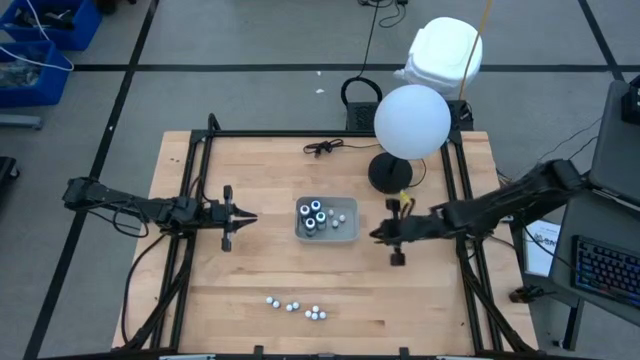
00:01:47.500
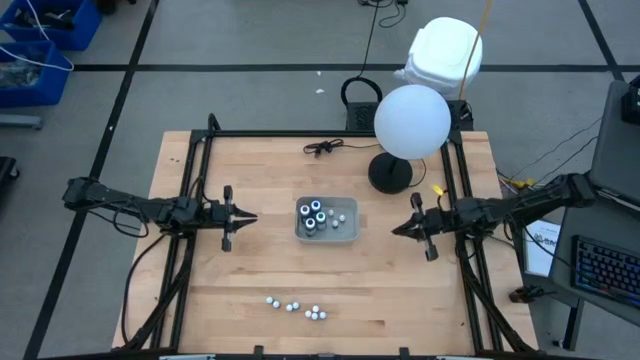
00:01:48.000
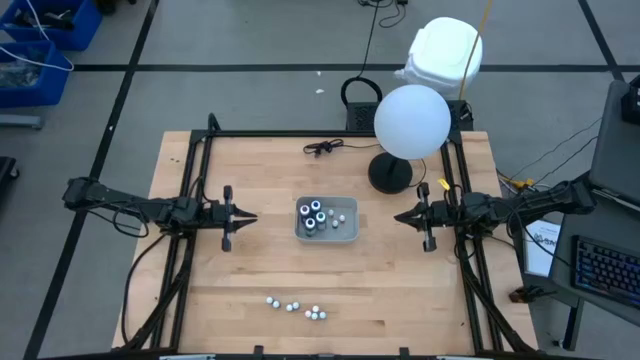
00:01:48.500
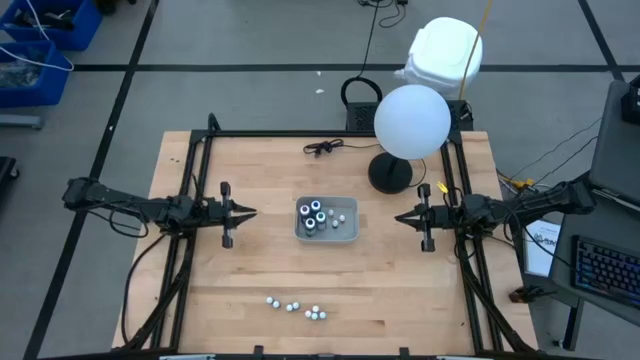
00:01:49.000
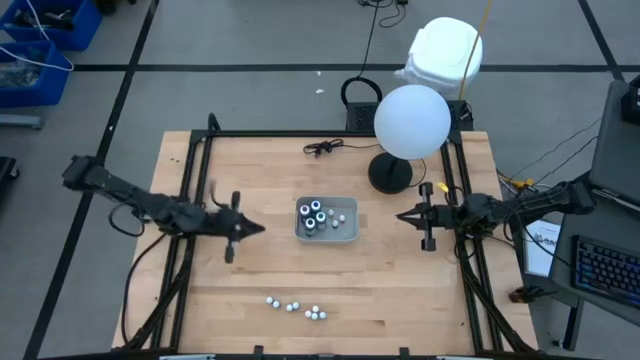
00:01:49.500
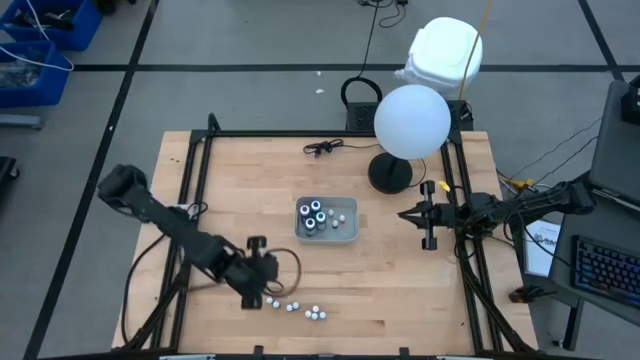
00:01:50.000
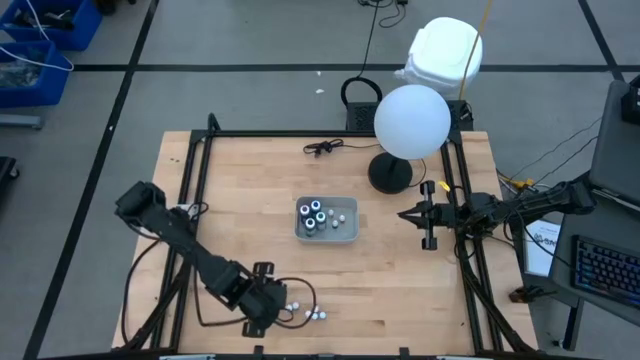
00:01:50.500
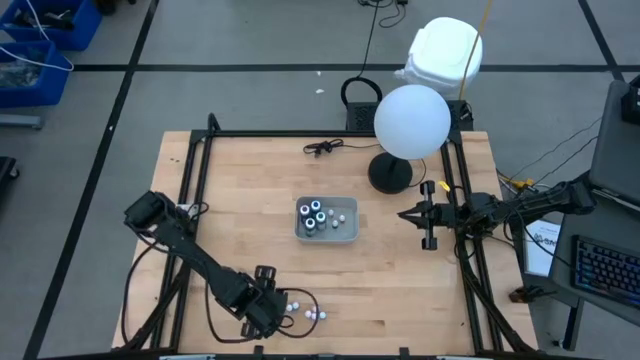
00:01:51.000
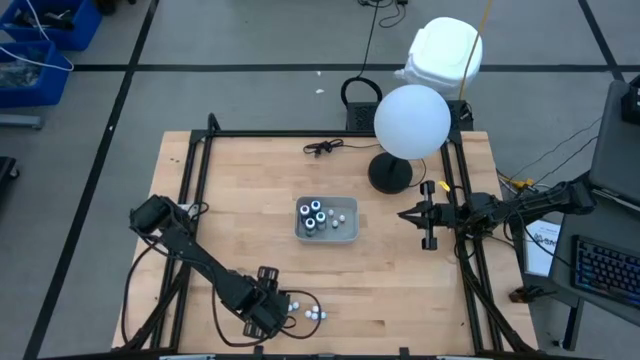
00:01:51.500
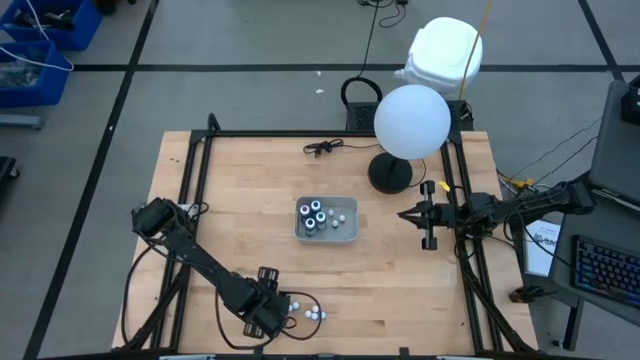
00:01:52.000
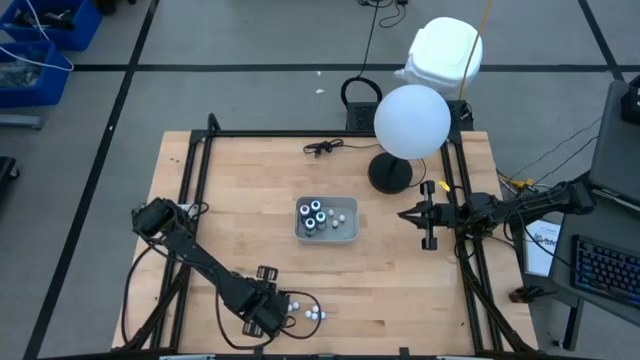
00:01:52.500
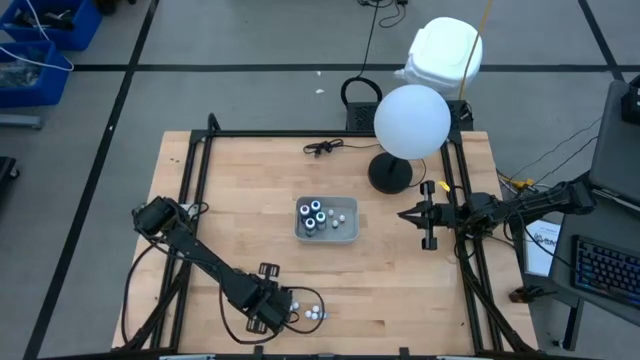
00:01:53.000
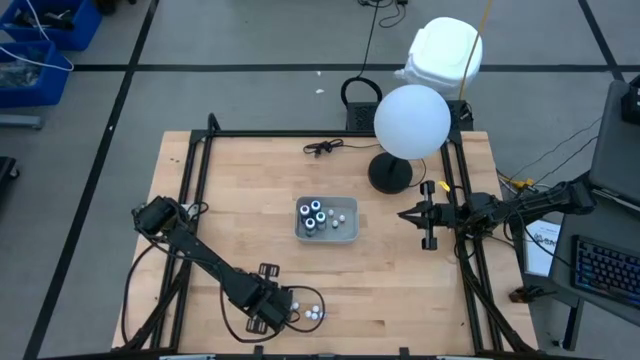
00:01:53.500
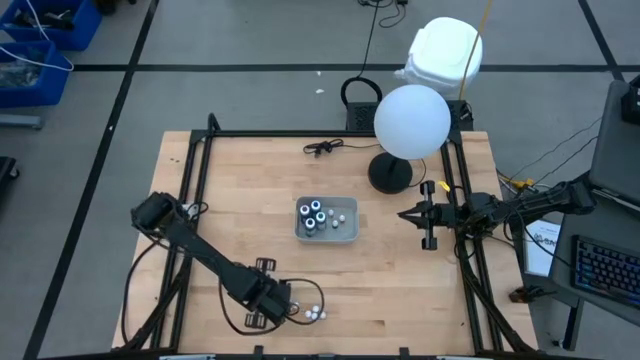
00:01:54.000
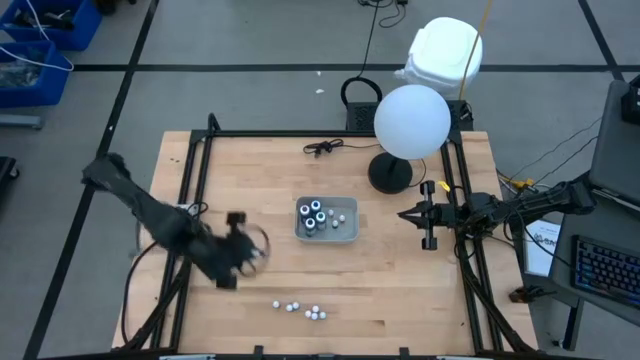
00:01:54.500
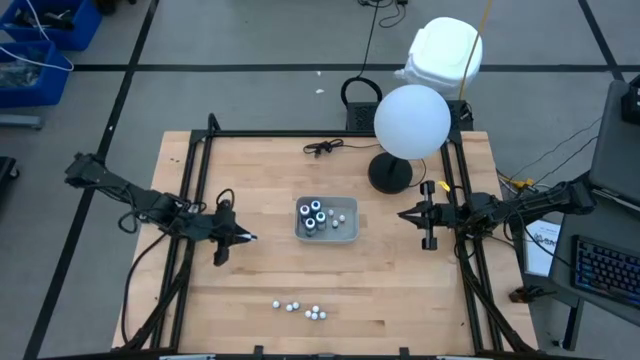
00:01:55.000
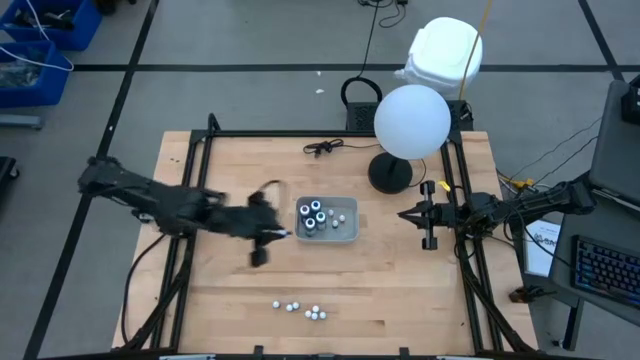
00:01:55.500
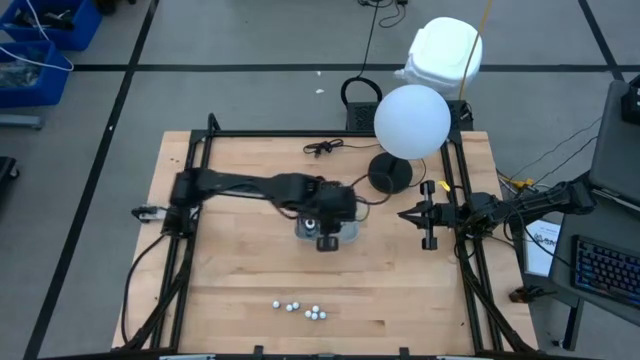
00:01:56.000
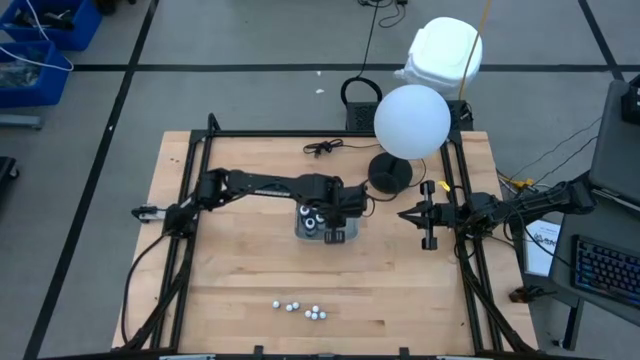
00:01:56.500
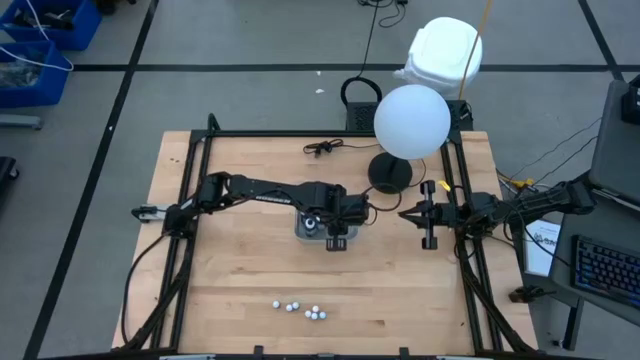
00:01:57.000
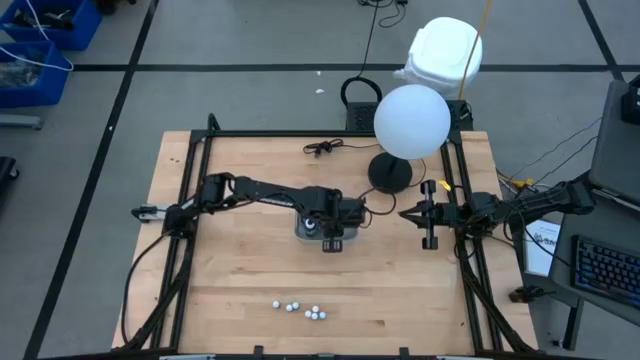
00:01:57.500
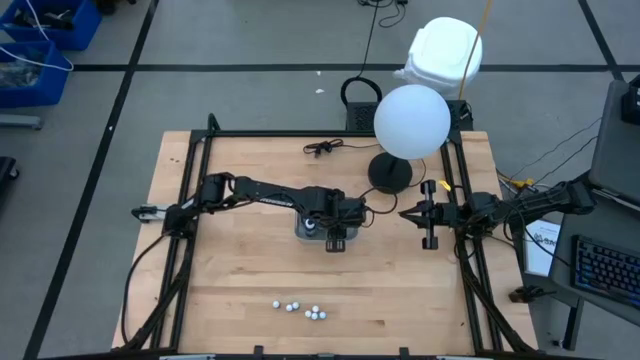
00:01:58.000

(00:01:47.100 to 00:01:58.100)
Task: Pick & Place food coloring
Put the small red food coloring bottle into the gray bin

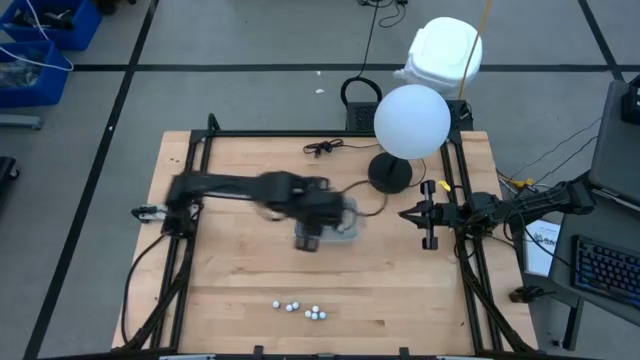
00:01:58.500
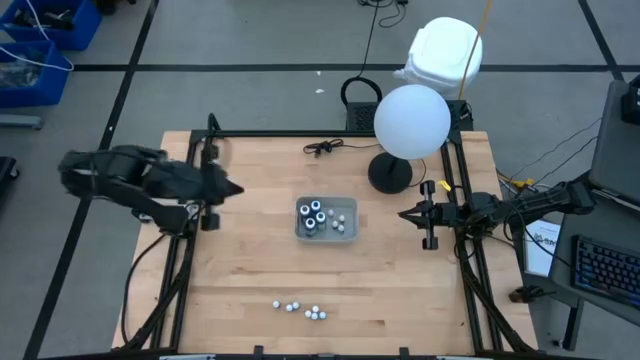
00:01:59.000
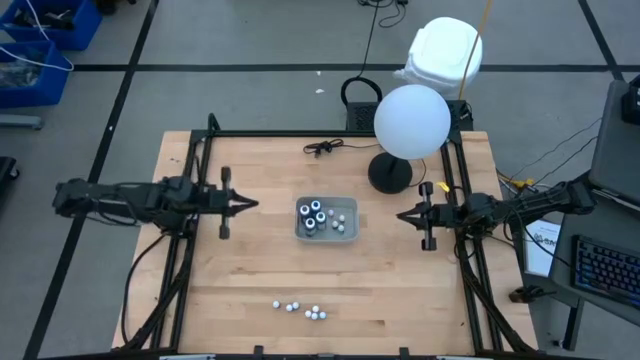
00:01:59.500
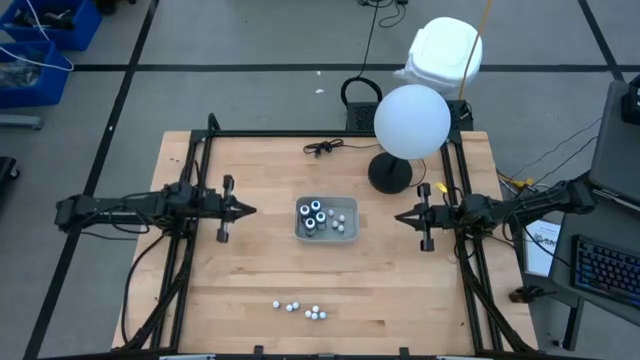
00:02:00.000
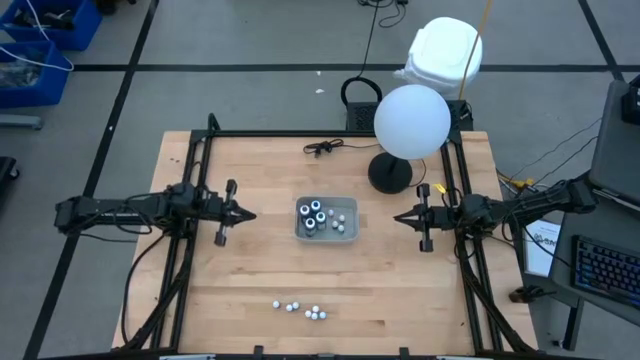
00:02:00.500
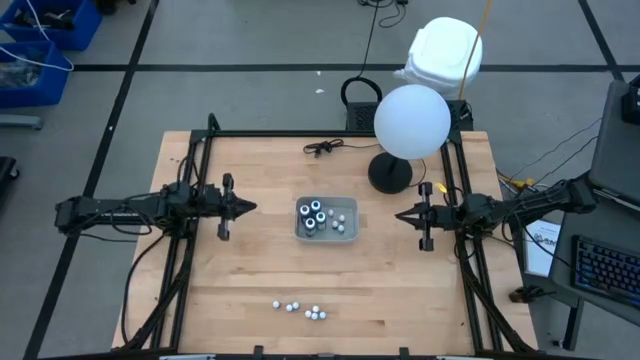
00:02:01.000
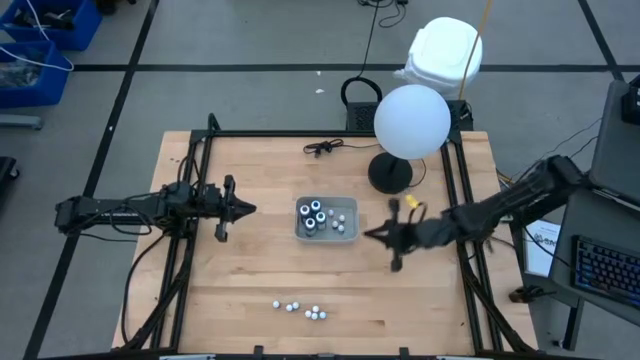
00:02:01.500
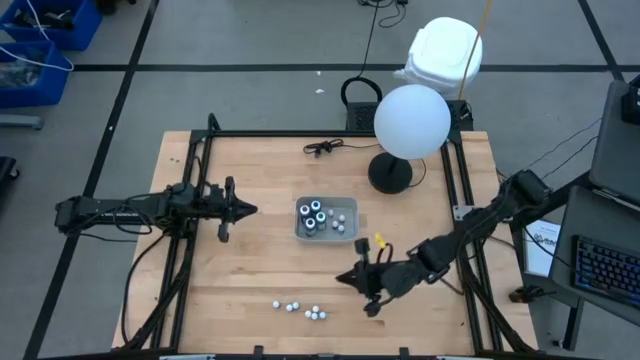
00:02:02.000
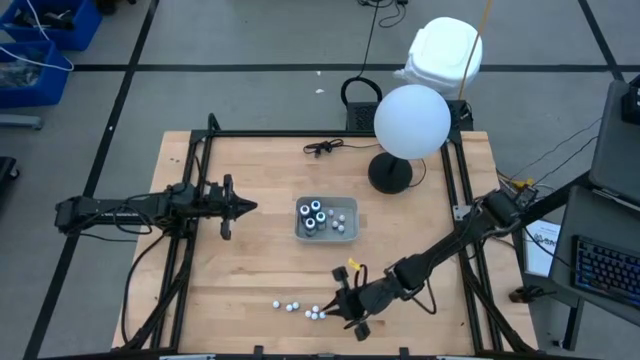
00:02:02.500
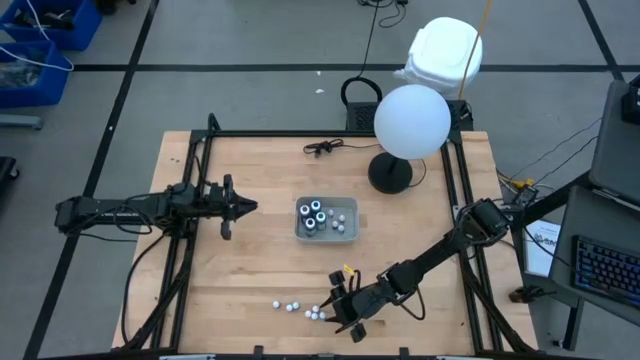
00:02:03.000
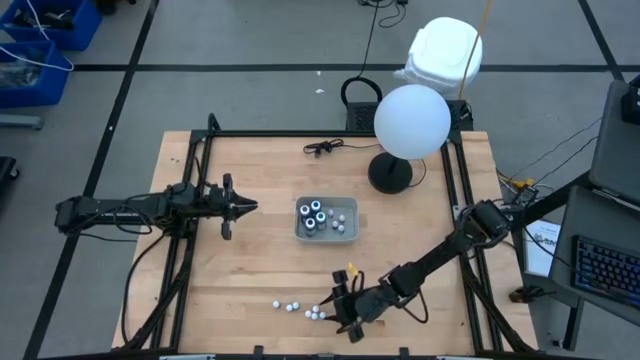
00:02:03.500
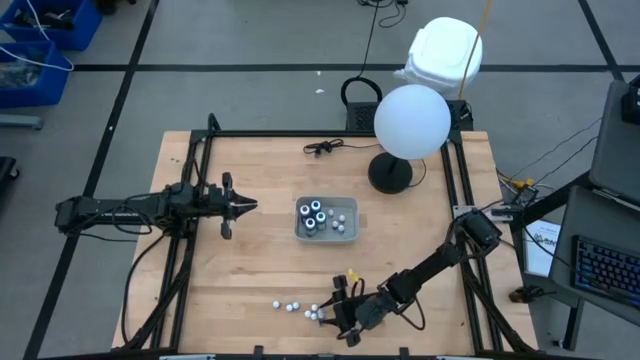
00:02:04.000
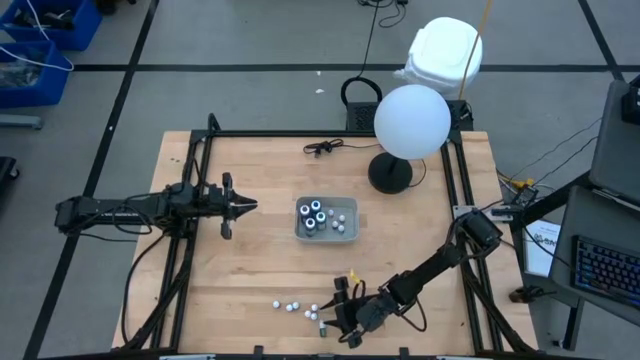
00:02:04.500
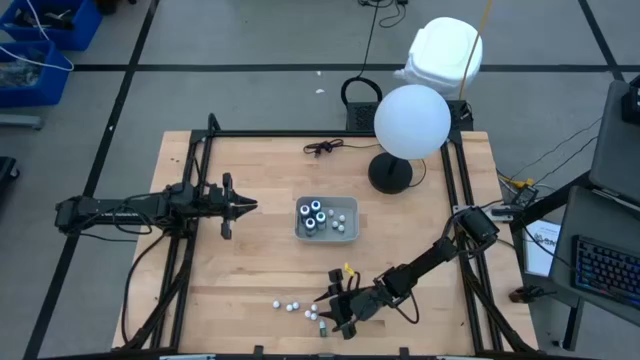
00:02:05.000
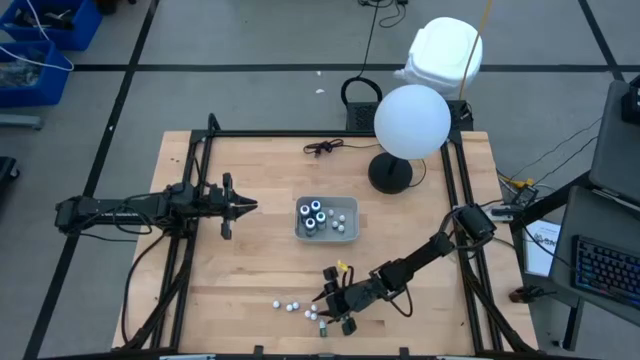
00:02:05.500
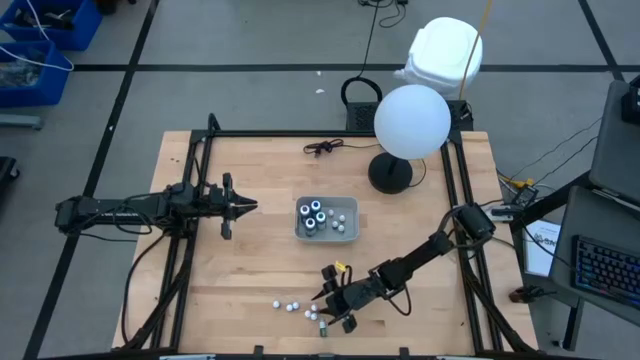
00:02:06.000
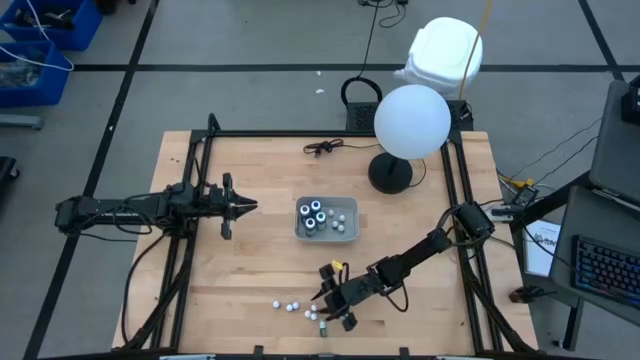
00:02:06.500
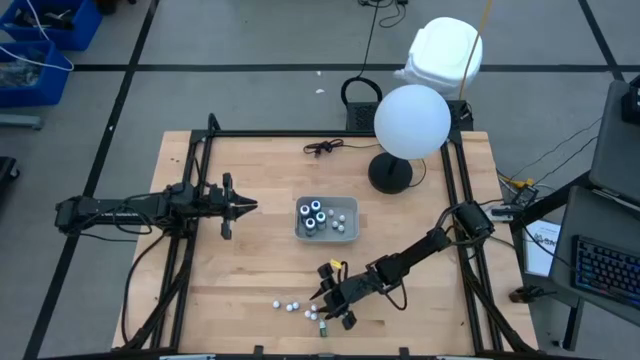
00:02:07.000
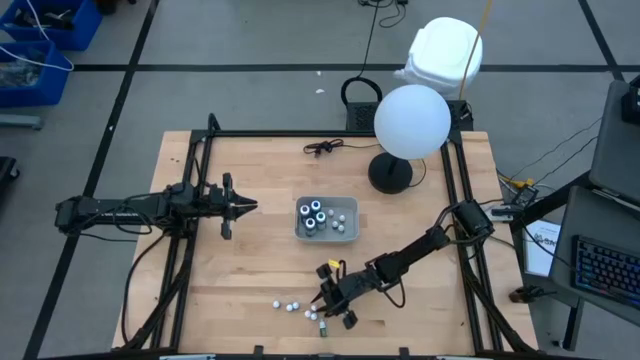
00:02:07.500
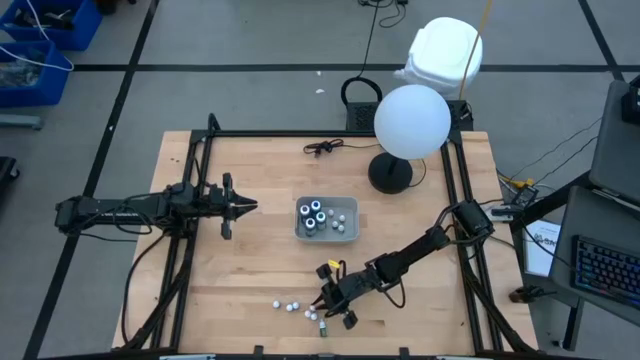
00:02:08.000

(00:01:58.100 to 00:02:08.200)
Put the right small yellow food coloring bottle into the gray bin

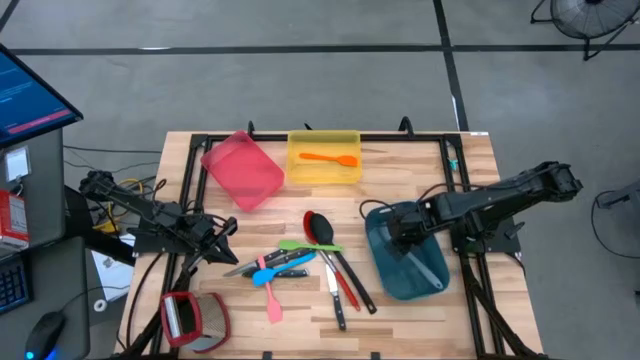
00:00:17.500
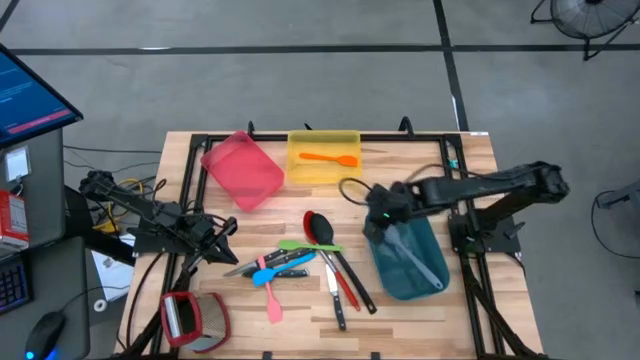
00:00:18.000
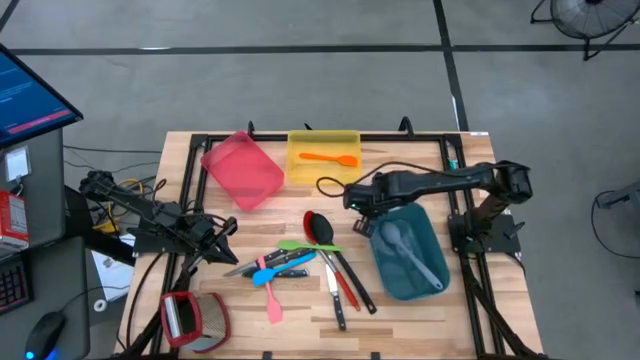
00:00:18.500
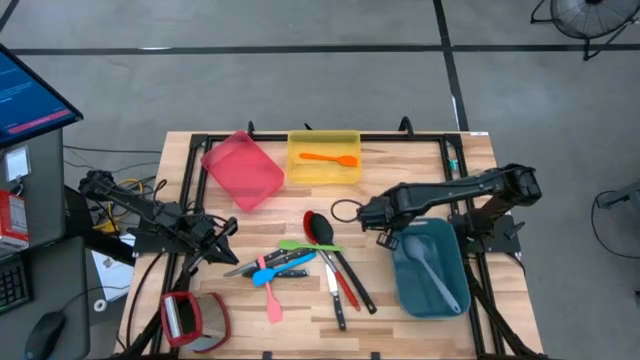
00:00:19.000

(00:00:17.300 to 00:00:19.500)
Task: Pick & Place Kitchen Items
Adjust the dark blue bin
